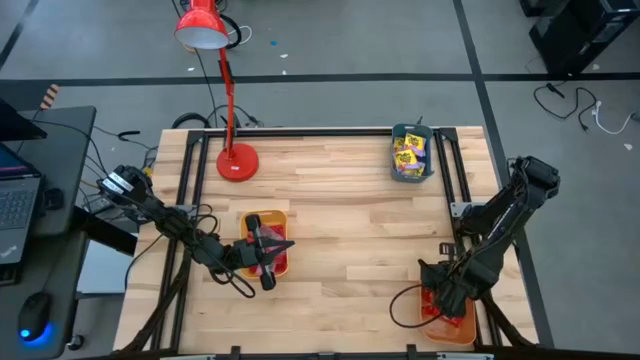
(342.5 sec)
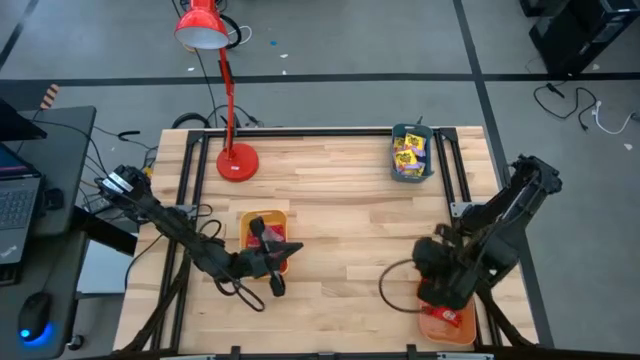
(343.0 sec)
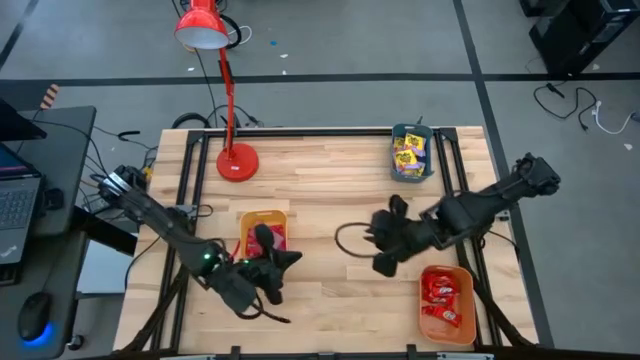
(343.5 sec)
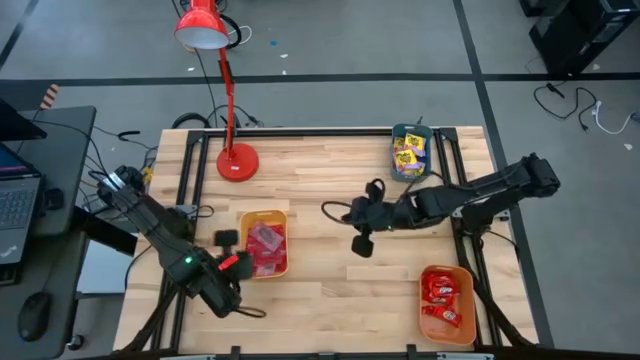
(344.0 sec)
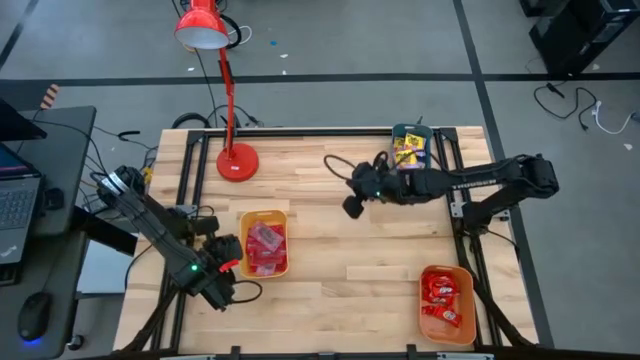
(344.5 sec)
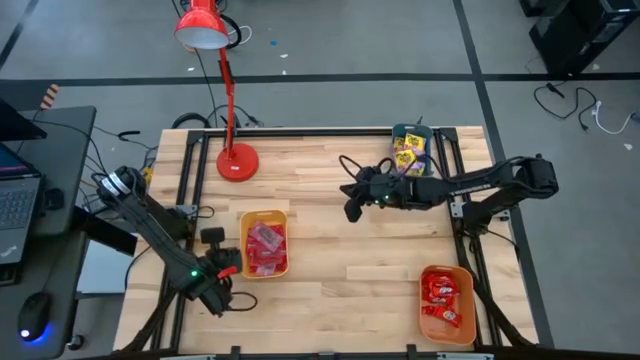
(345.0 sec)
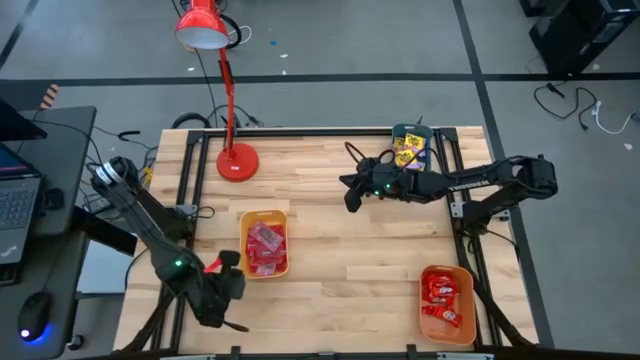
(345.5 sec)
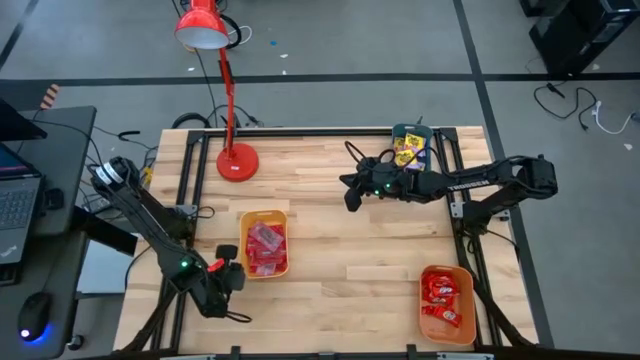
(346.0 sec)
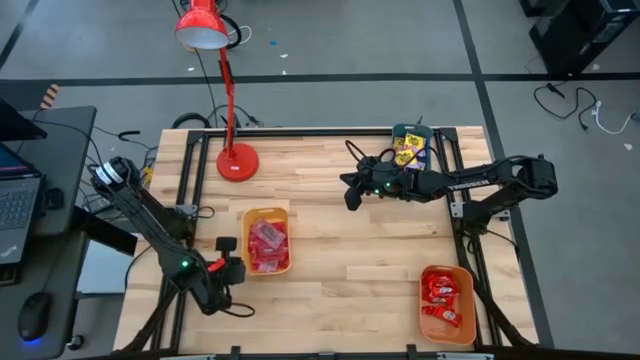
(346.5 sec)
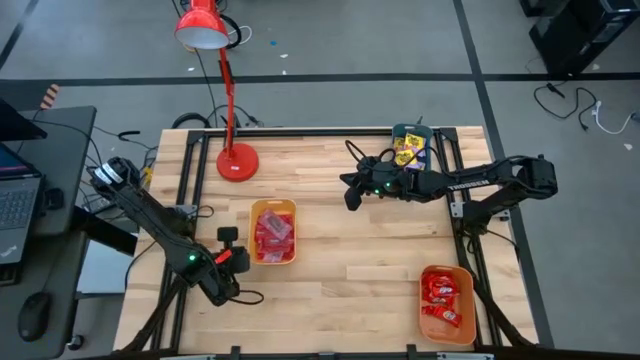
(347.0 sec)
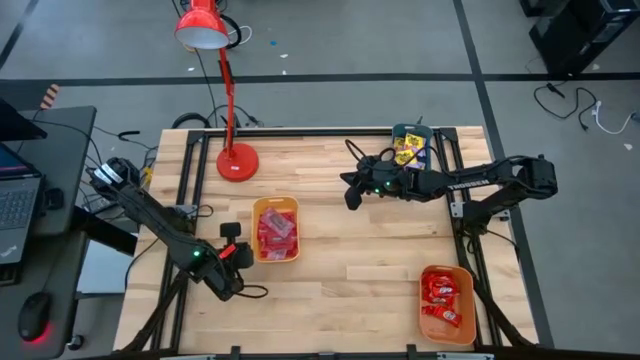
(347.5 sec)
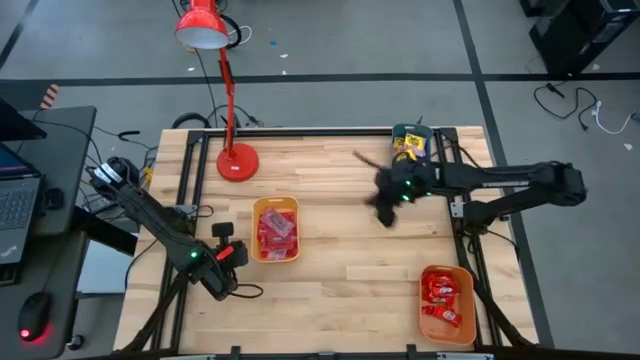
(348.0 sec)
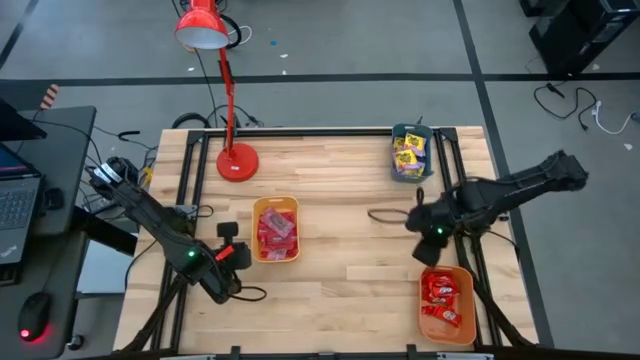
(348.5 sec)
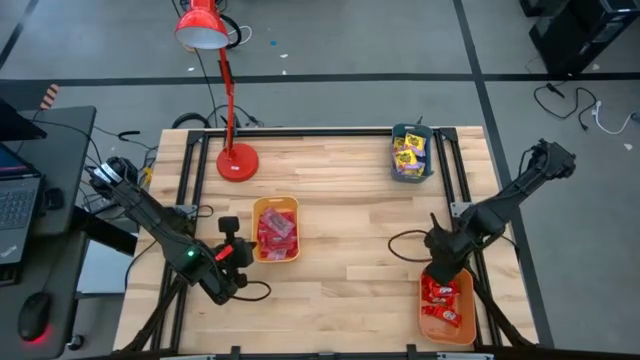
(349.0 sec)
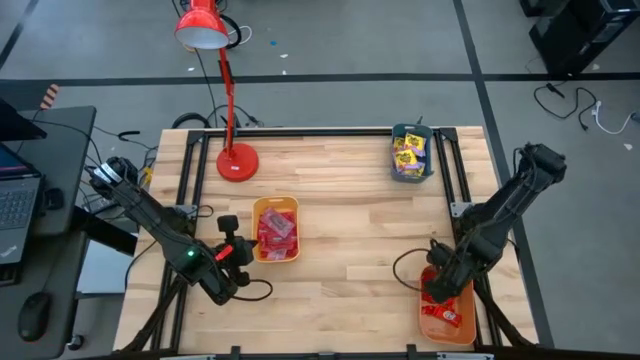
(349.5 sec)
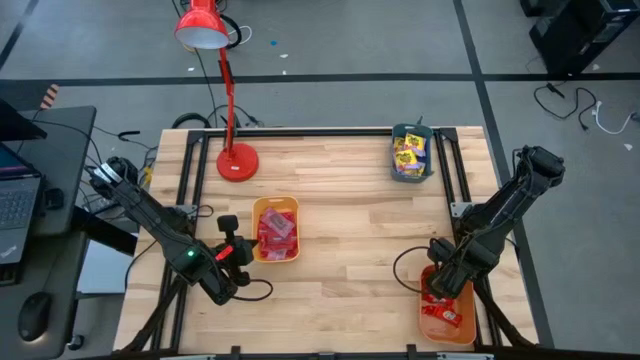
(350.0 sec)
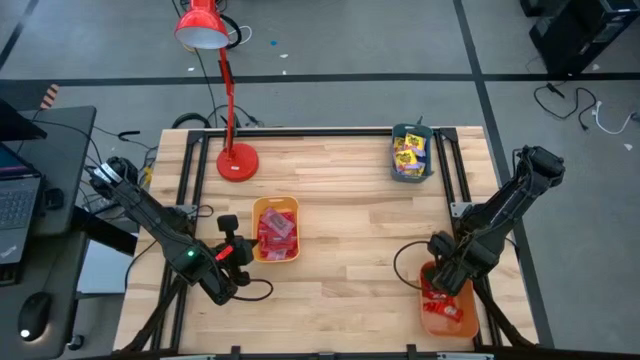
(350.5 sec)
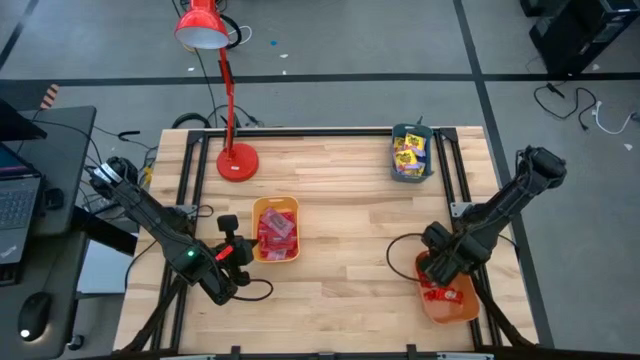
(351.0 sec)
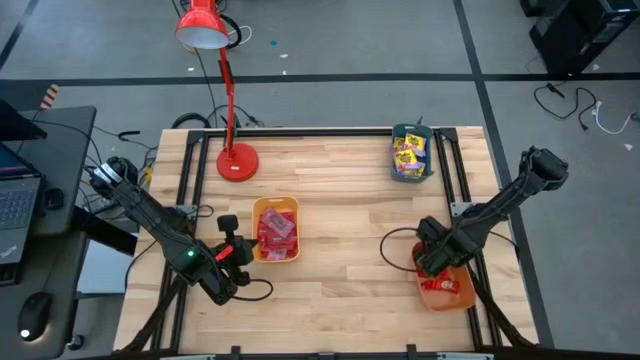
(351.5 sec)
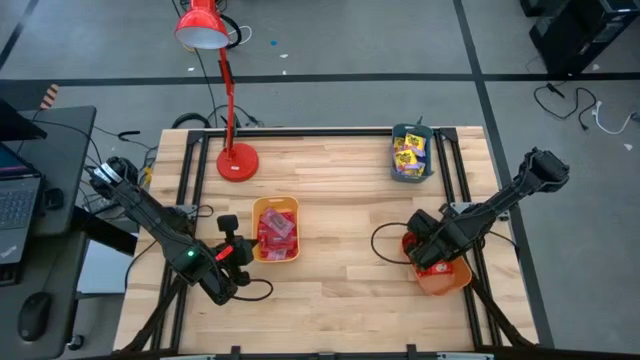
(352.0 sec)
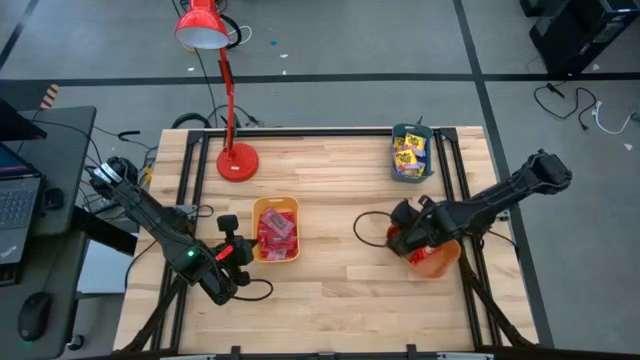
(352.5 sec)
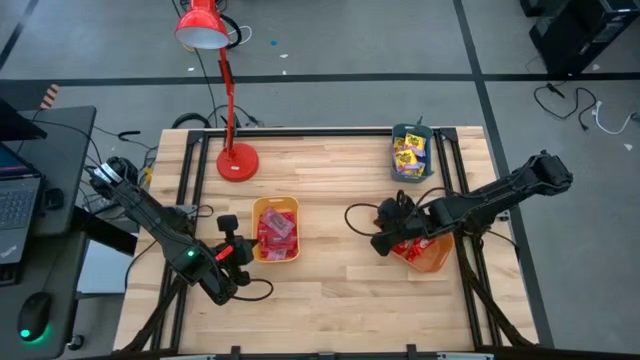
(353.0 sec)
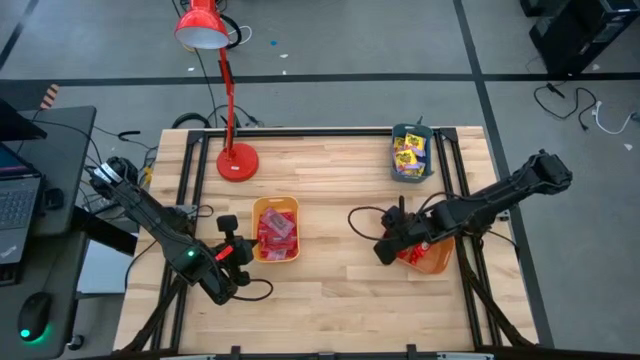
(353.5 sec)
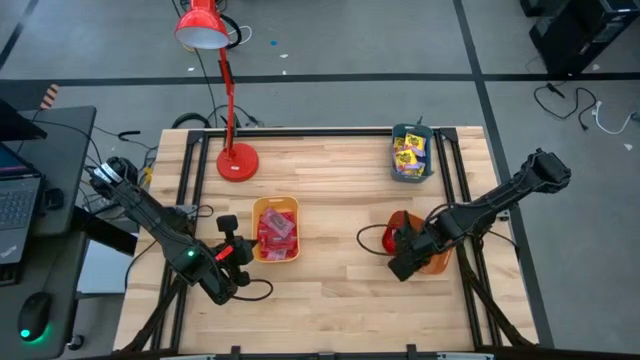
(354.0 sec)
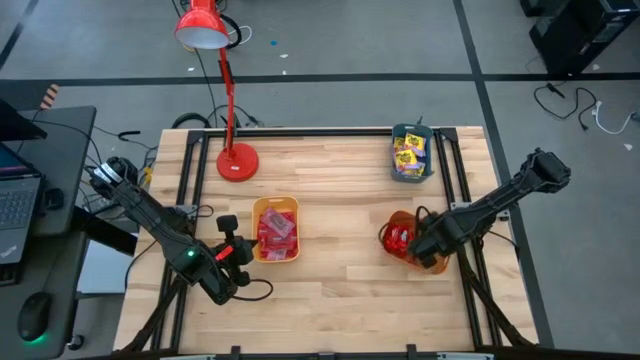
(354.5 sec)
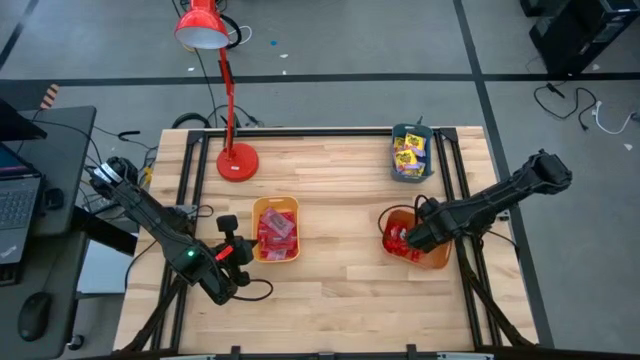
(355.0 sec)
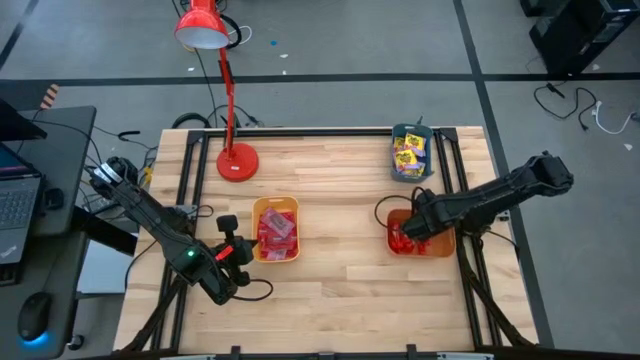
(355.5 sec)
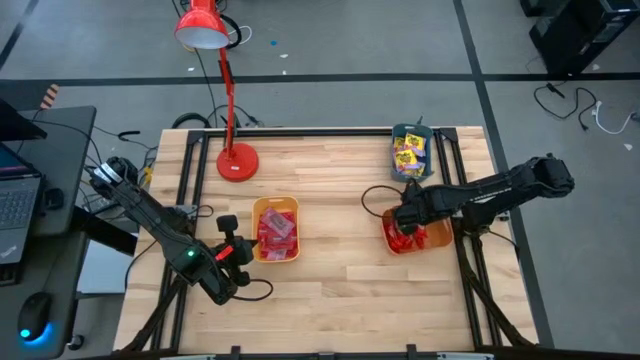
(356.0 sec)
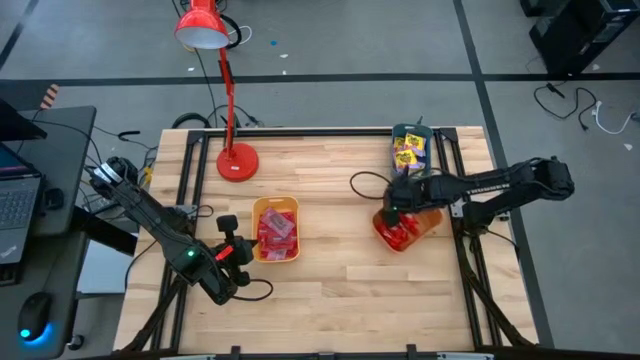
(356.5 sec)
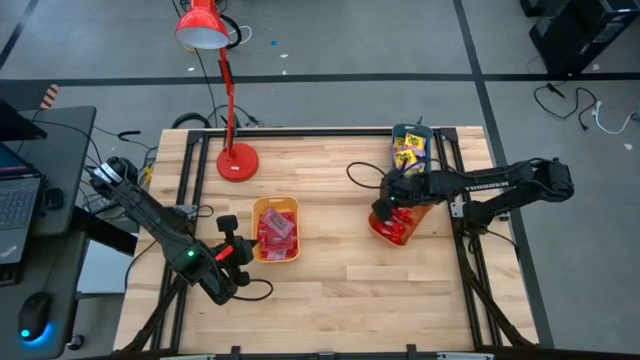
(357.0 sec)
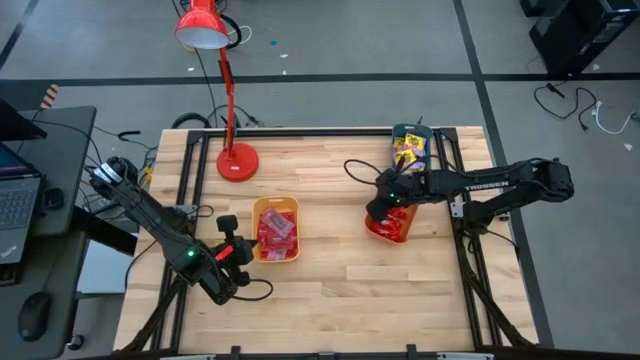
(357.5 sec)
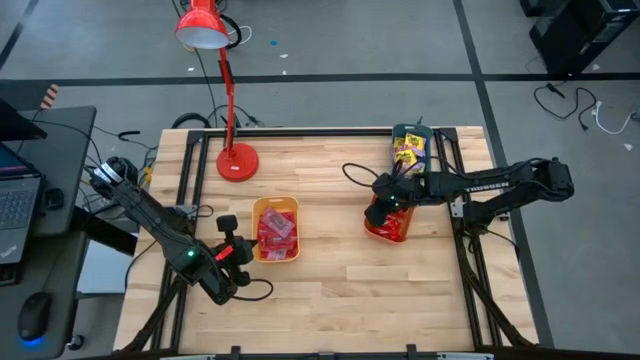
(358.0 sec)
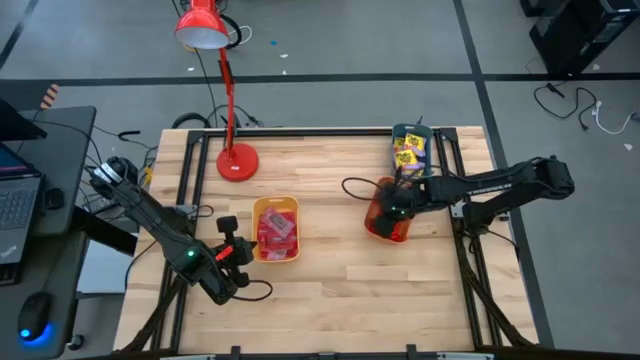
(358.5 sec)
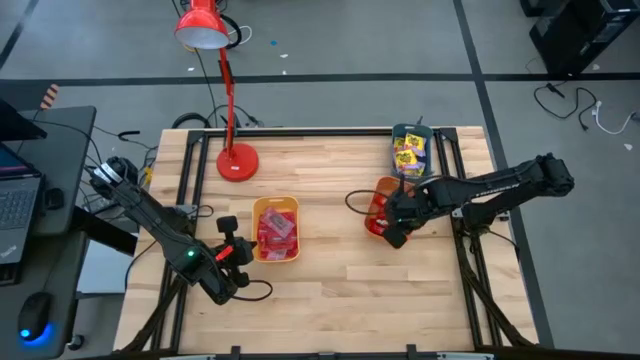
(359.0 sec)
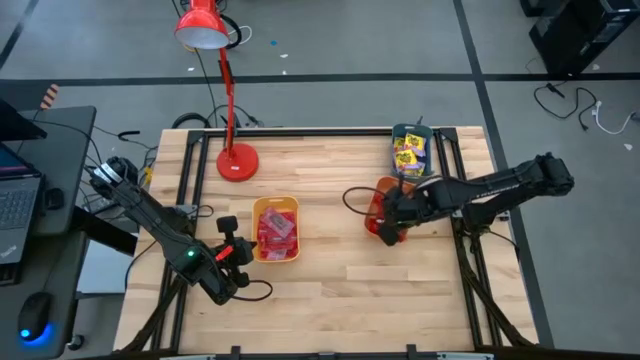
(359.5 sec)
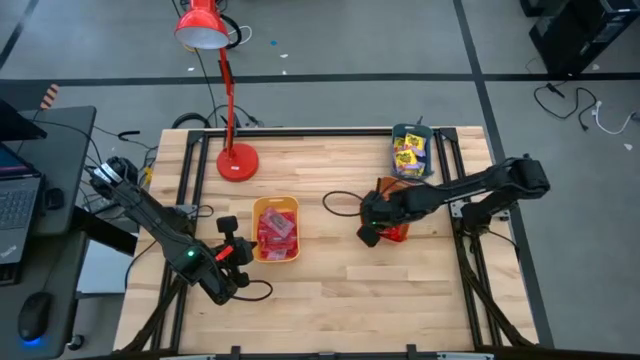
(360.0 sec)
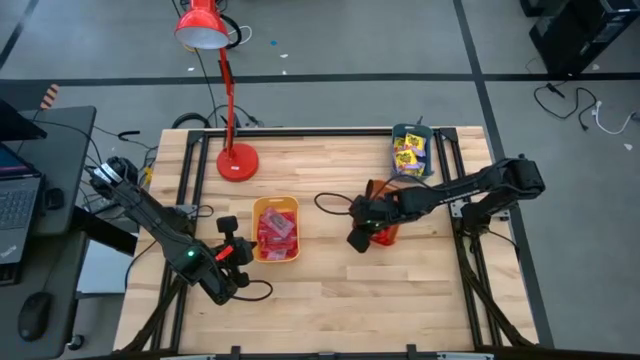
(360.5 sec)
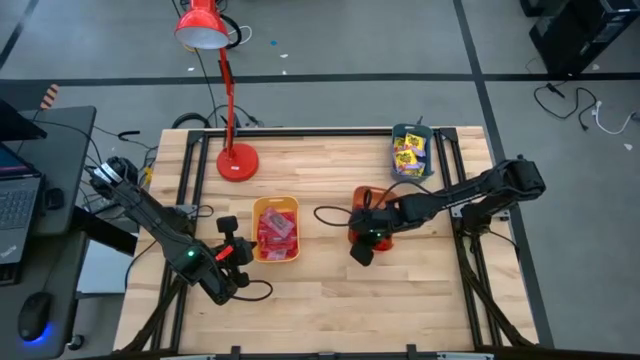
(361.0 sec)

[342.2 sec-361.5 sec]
Task: Sort candy
Move the bins to the center of the table

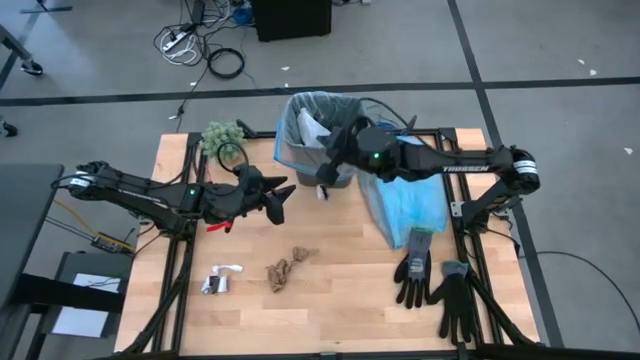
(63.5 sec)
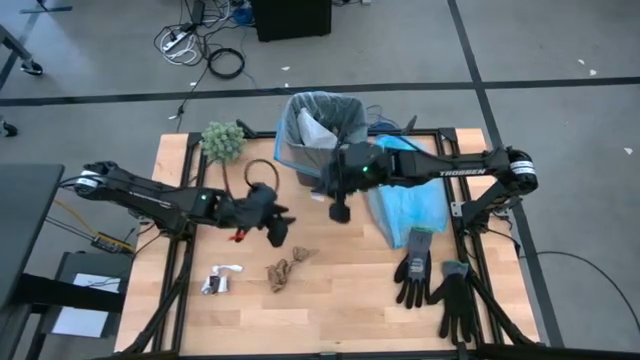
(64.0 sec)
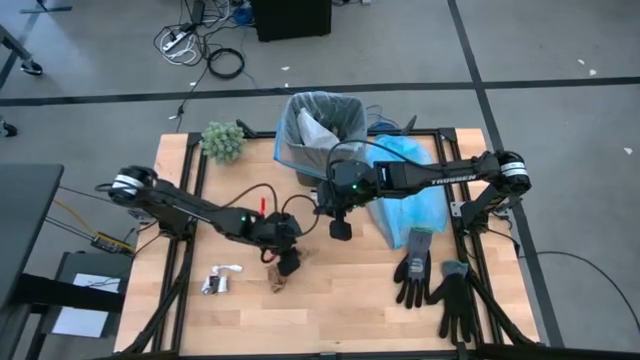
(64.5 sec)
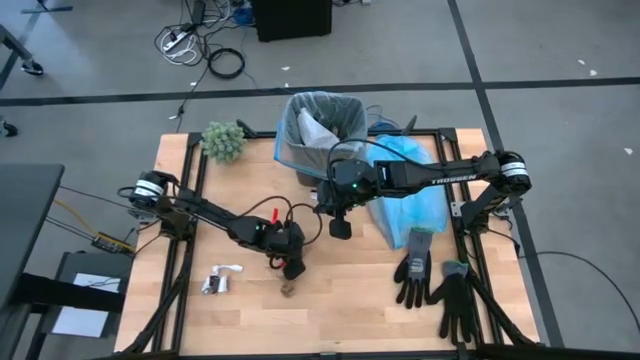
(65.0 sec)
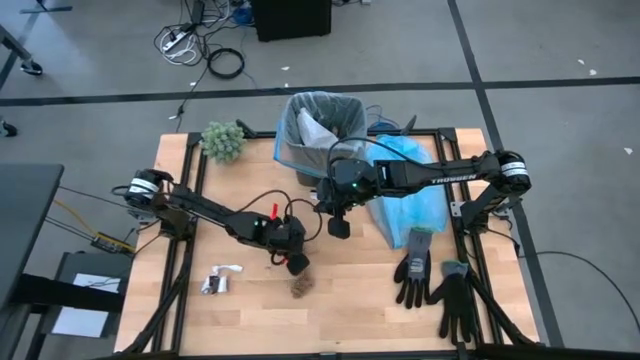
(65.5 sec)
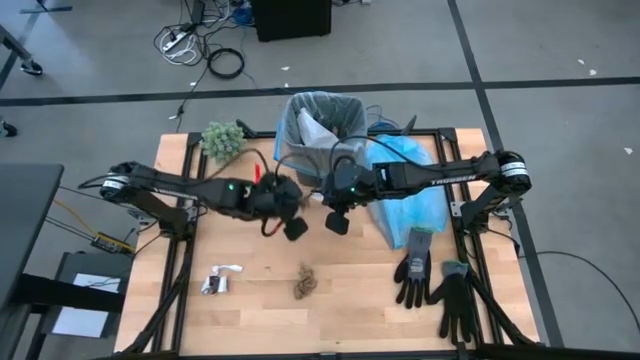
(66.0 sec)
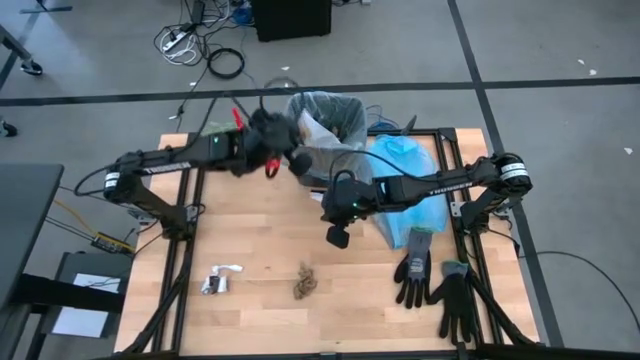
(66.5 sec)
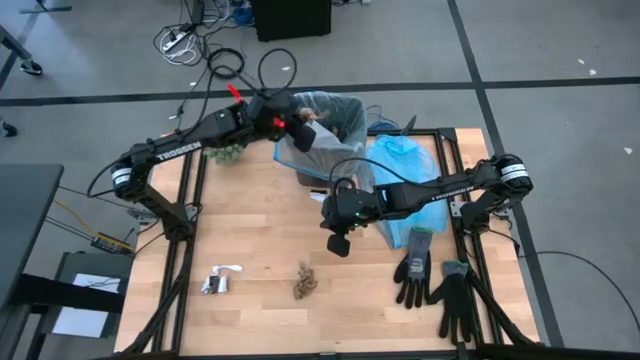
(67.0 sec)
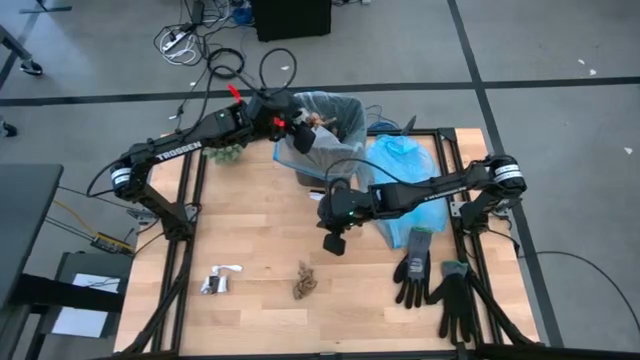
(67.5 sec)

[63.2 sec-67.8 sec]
Task: place trash/remove bag and relplace
Put the brown napkin into the trash bin
